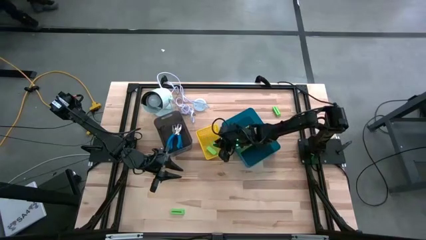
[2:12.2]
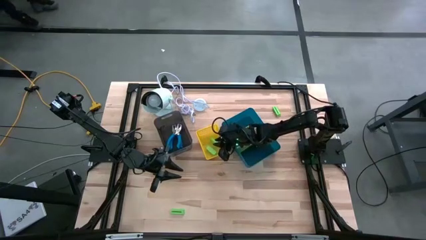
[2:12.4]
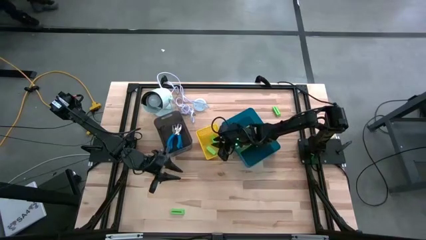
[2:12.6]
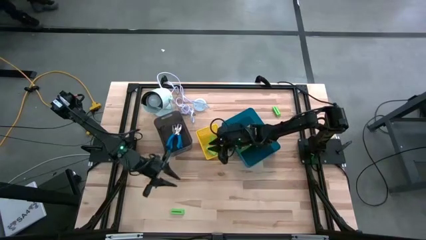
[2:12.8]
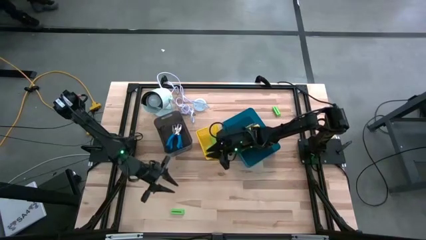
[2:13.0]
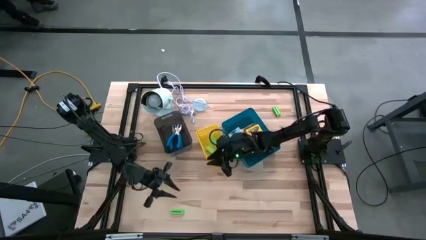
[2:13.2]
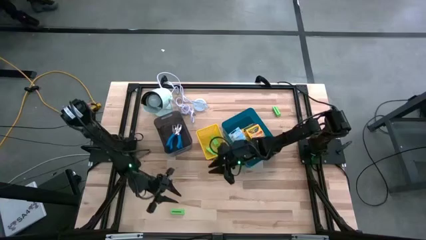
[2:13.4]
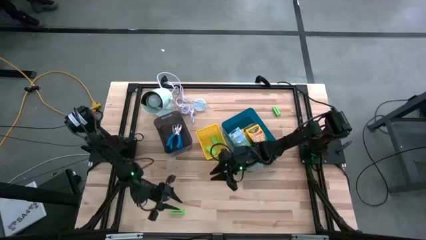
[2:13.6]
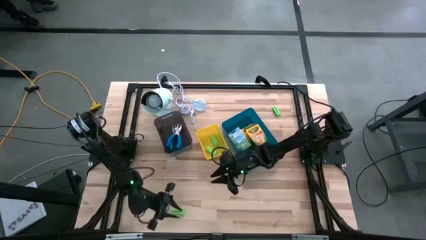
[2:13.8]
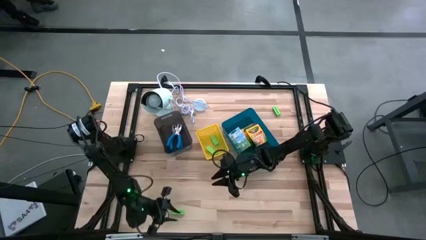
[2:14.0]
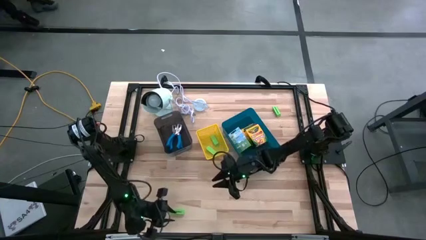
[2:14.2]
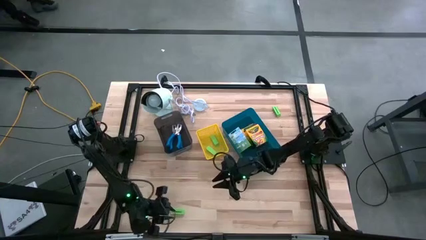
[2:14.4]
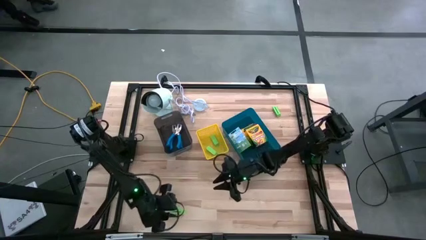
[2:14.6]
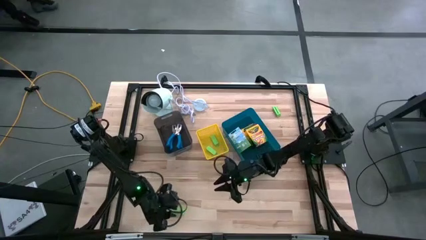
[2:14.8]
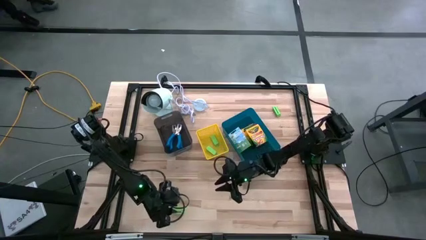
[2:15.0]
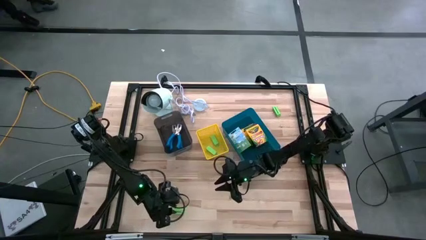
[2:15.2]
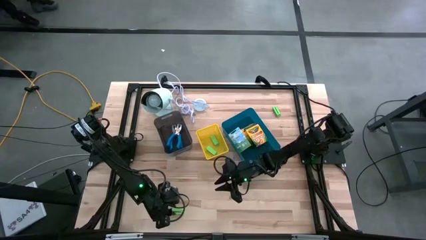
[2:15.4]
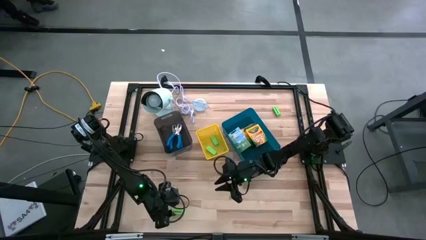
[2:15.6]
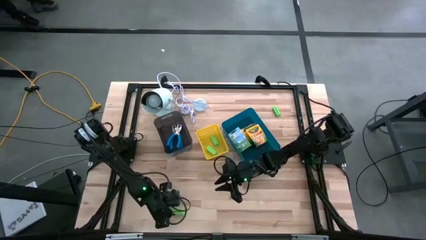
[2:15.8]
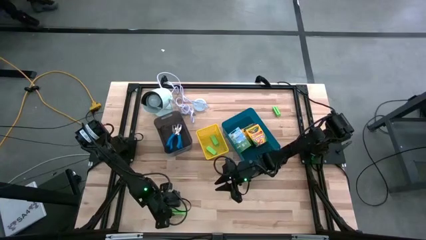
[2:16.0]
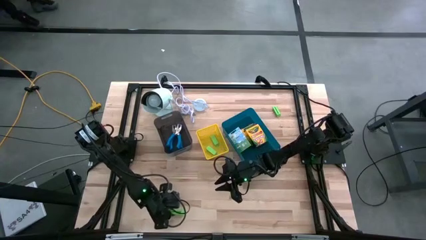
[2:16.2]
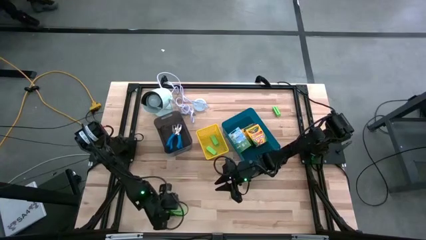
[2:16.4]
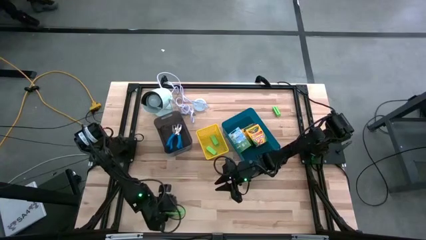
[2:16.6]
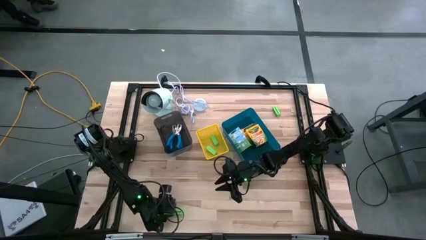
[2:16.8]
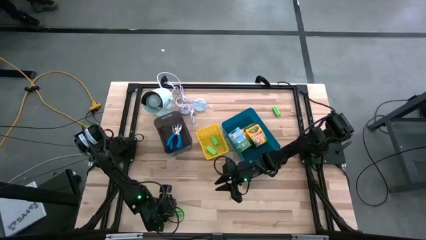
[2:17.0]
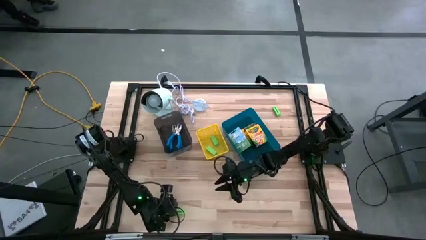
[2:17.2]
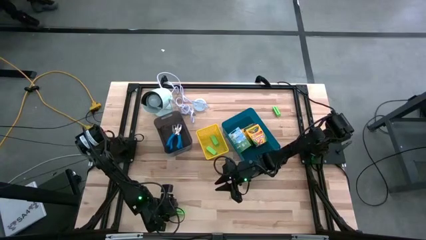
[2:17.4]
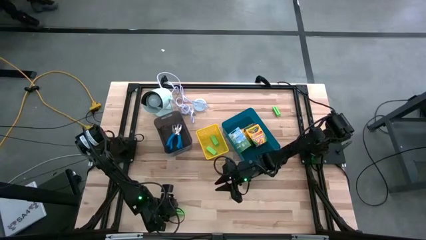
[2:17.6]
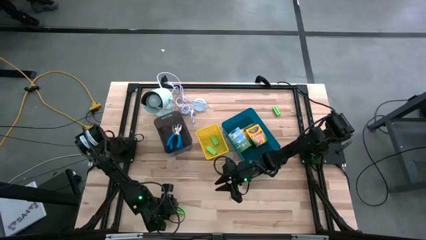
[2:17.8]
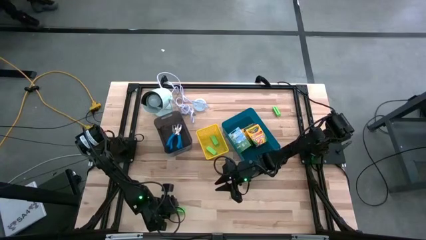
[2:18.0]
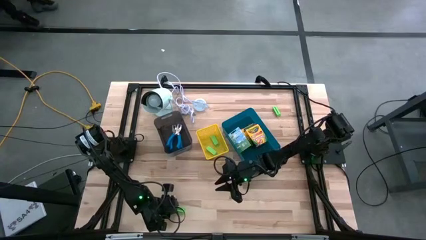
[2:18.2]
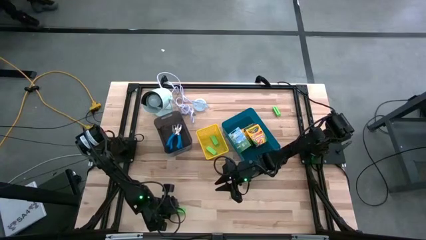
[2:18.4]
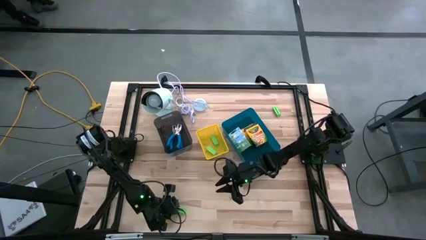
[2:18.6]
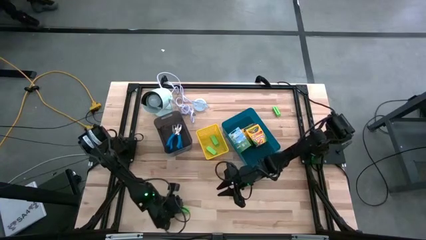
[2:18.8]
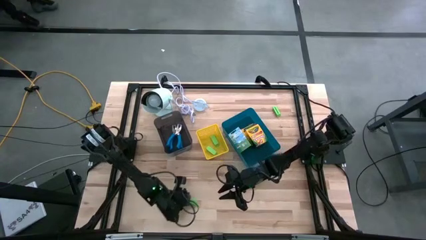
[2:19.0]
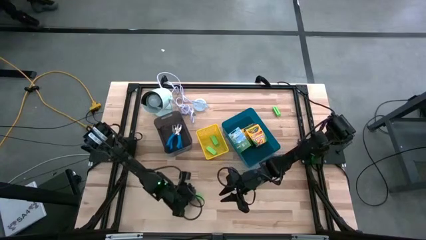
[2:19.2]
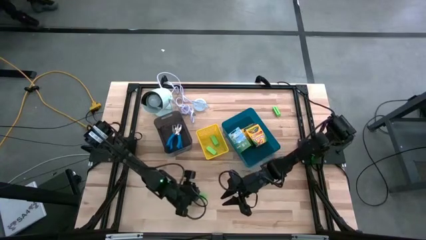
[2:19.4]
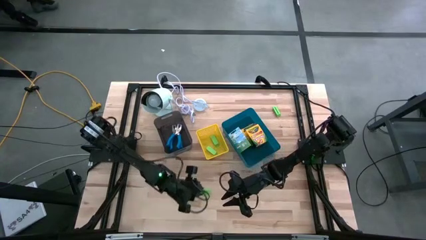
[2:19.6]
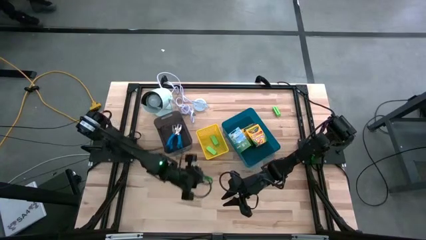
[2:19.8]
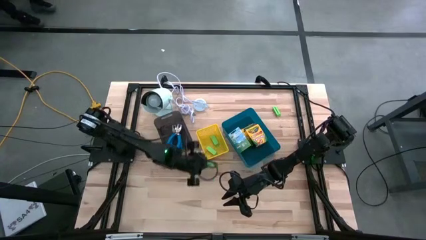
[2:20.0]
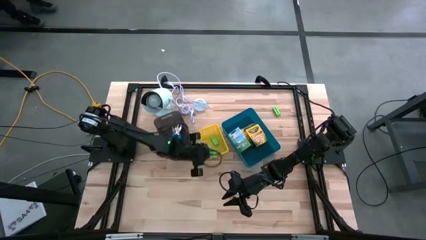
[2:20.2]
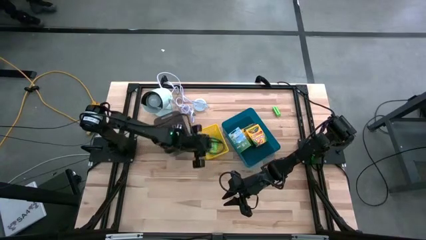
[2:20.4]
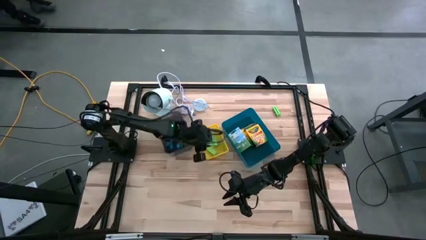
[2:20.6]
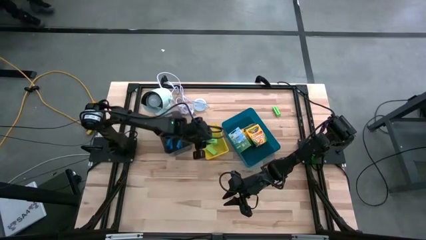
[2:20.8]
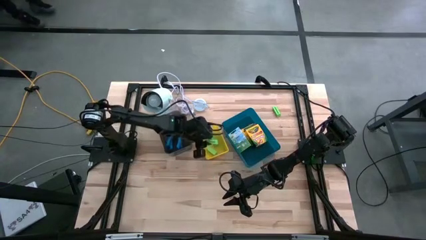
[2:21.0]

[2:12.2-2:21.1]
Task: Pick & Place School Supplies
Put the green eraser into the yellow bin

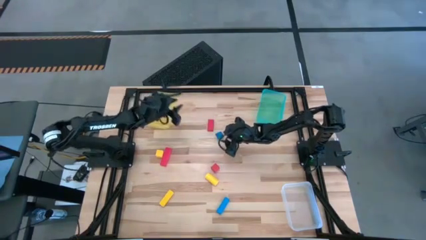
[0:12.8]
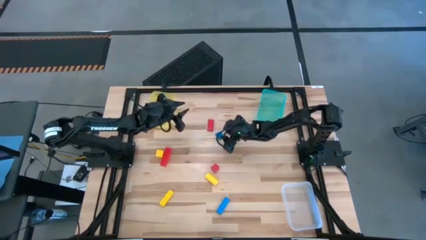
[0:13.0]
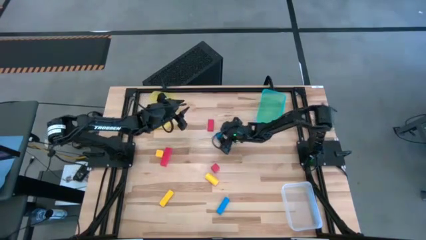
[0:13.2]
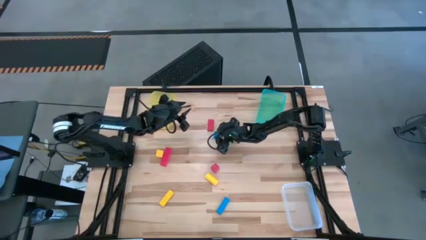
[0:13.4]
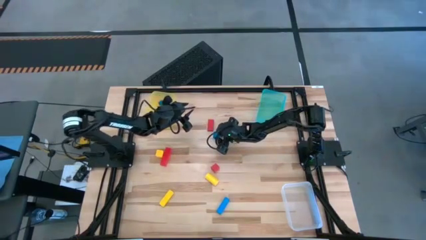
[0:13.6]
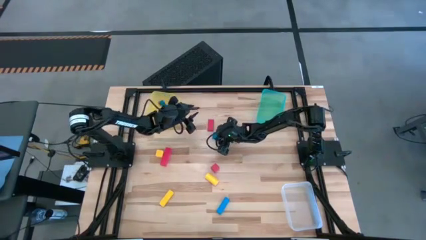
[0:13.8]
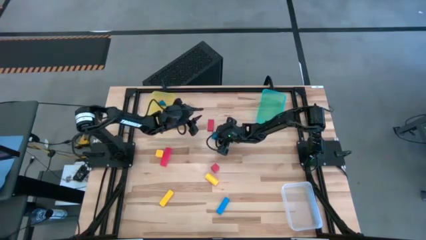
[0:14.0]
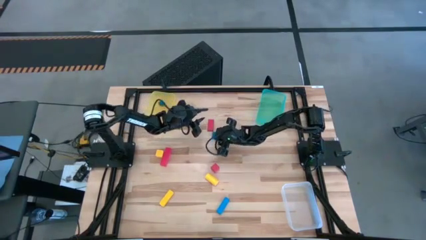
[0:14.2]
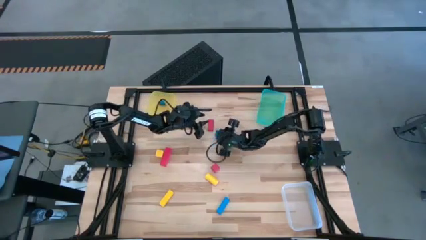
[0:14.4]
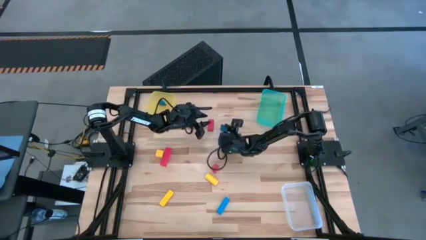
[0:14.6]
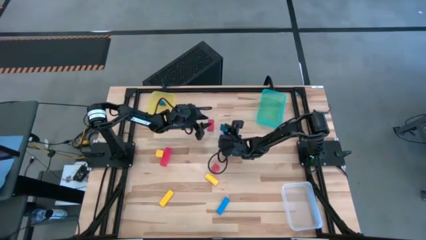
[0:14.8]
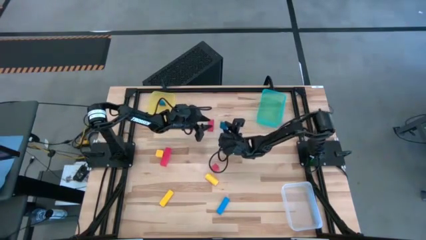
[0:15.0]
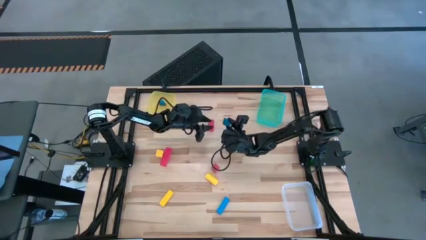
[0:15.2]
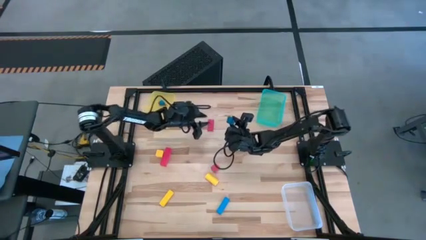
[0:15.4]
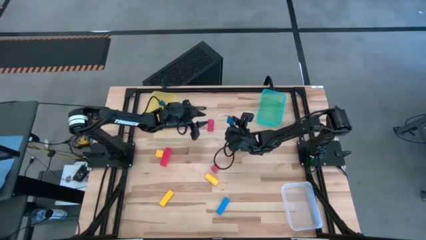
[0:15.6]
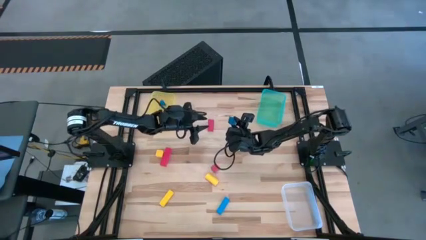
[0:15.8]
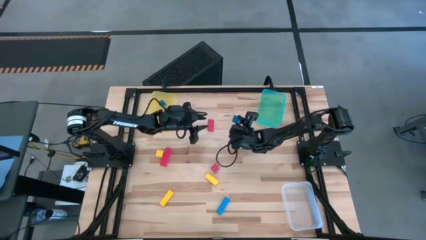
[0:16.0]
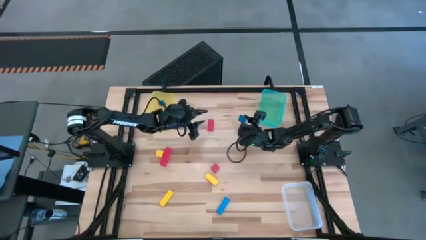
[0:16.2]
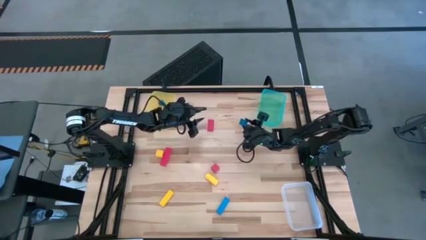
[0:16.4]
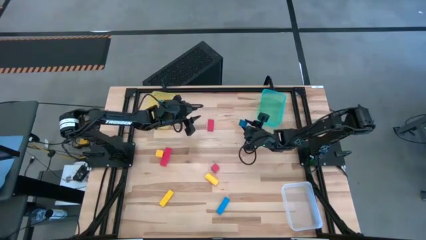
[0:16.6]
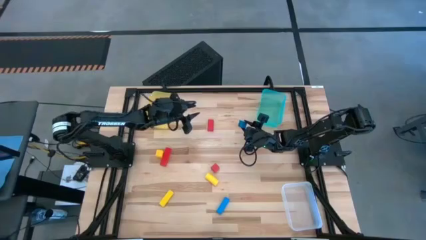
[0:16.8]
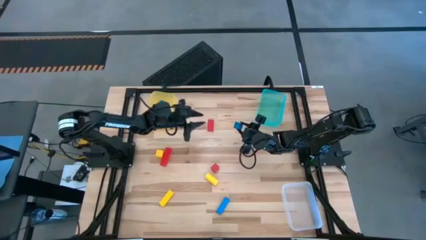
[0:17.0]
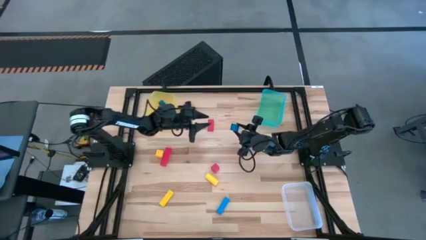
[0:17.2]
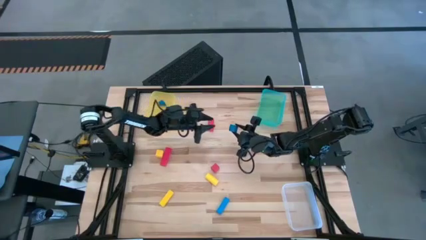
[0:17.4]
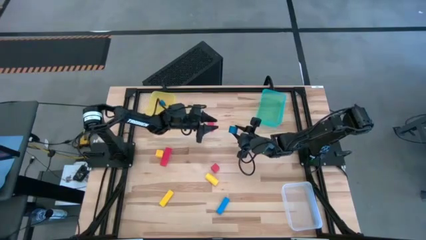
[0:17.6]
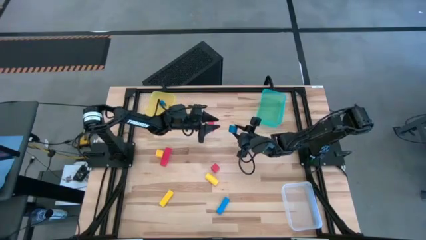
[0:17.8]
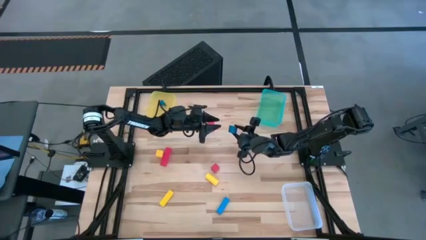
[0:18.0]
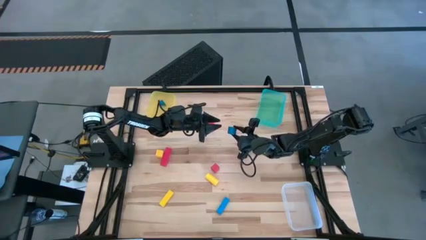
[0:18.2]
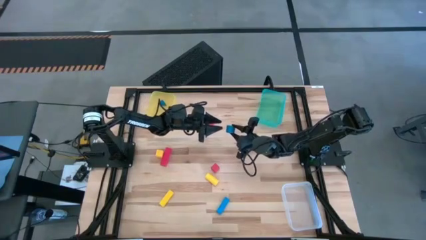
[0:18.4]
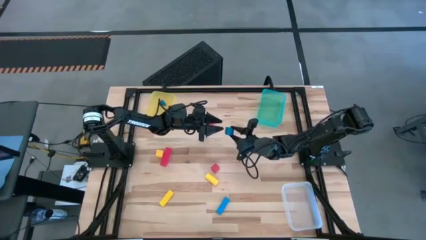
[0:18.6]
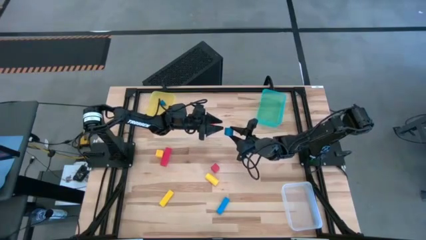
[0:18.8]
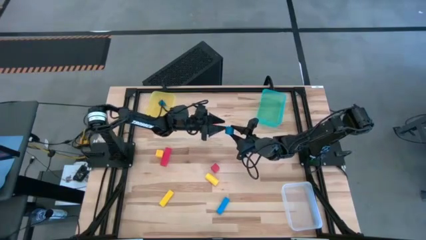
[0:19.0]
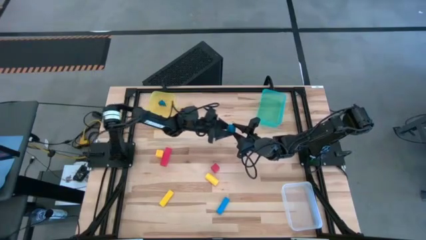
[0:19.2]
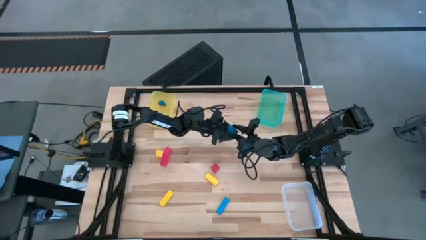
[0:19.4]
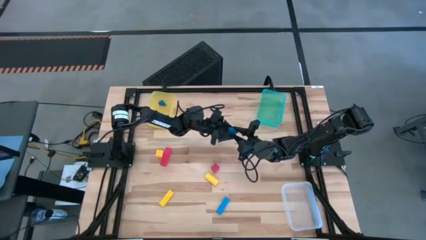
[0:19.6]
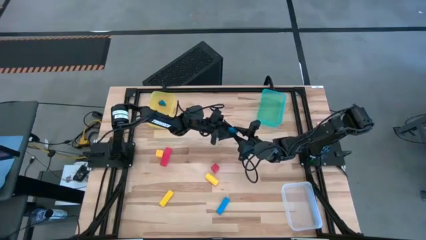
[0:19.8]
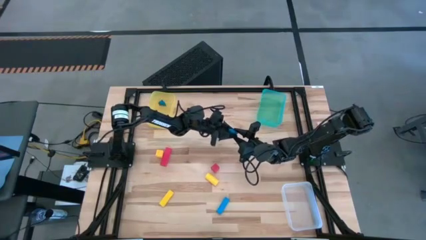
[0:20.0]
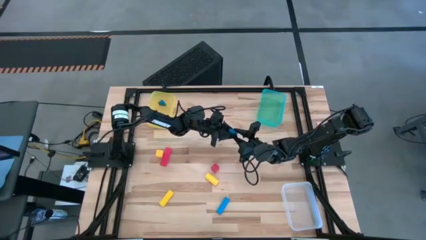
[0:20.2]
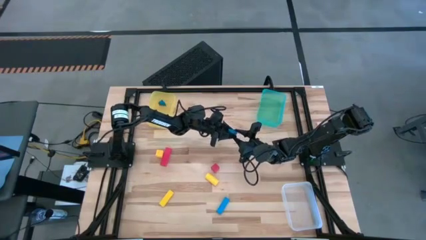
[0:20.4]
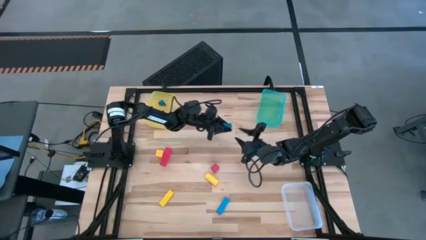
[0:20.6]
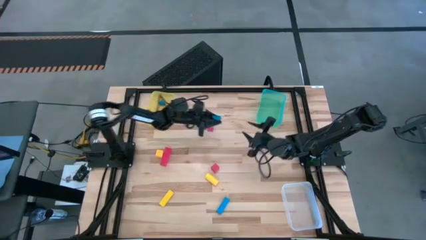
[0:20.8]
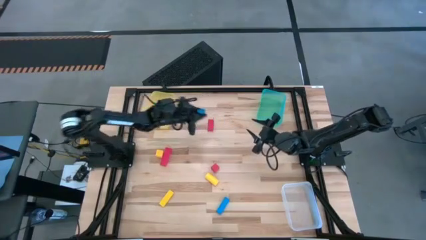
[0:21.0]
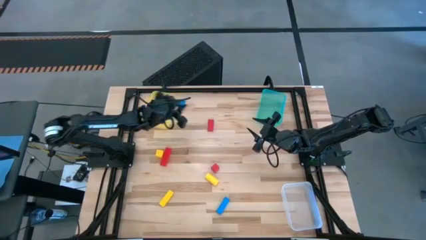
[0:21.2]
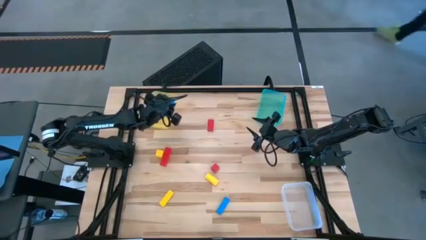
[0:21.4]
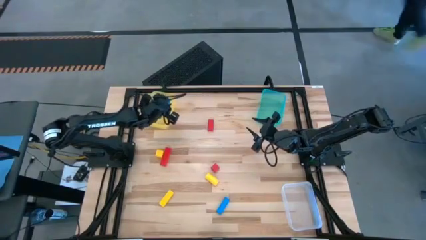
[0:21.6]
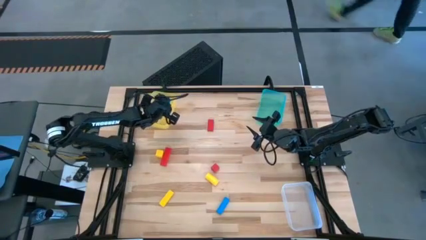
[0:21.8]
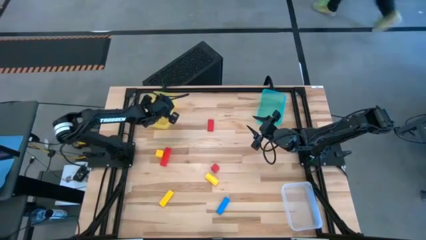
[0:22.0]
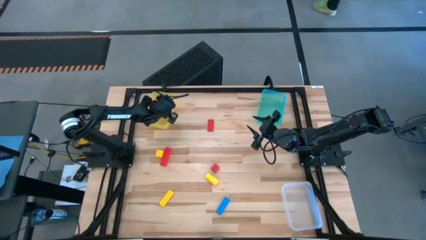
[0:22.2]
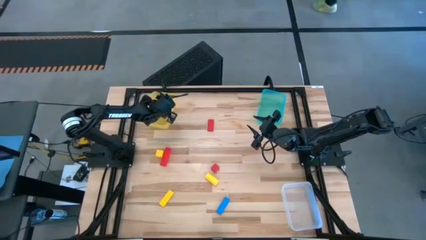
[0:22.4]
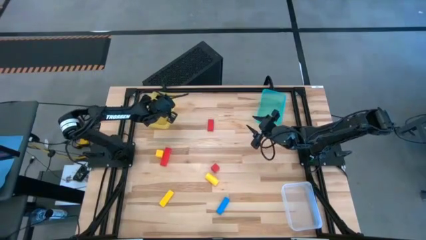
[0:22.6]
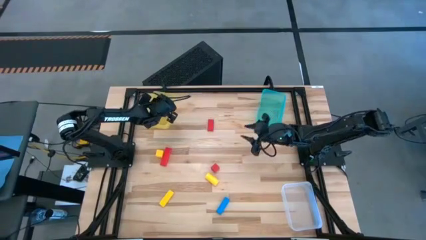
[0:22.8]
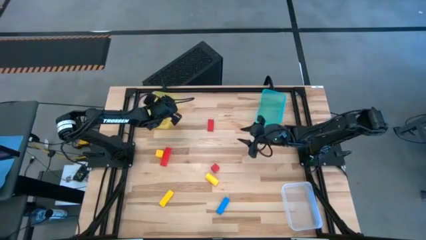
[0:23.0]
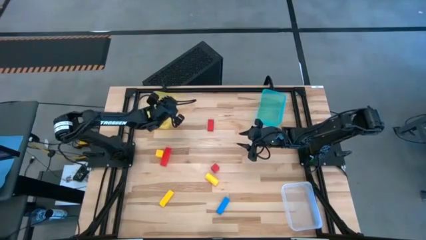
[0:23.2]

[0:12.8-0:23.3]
Task: Sort & place blocks by color
Put the blue circle block into the yellow bin
